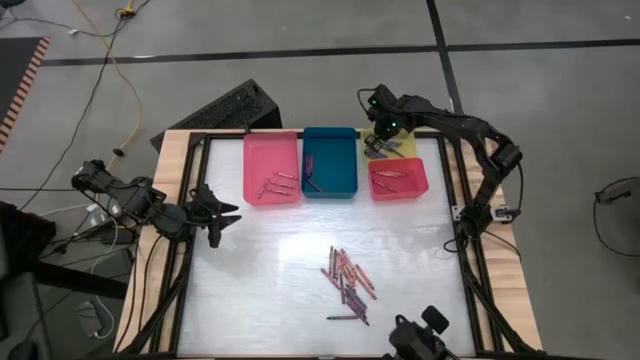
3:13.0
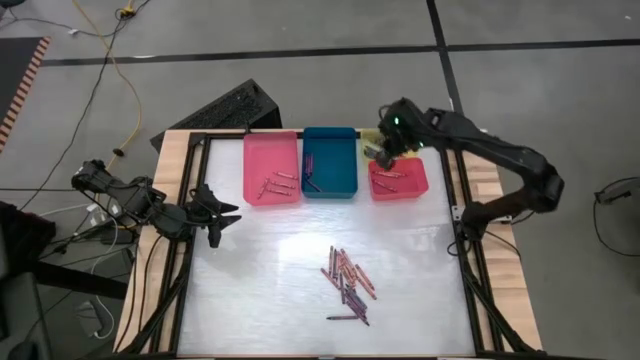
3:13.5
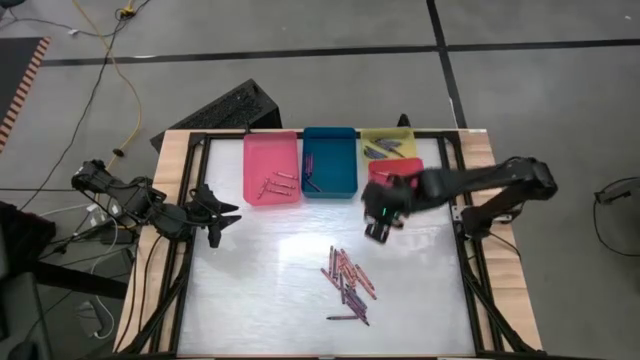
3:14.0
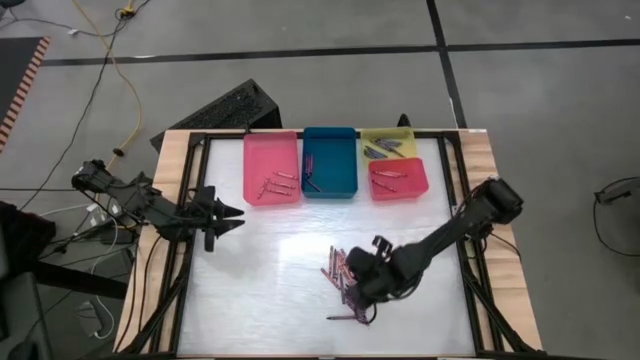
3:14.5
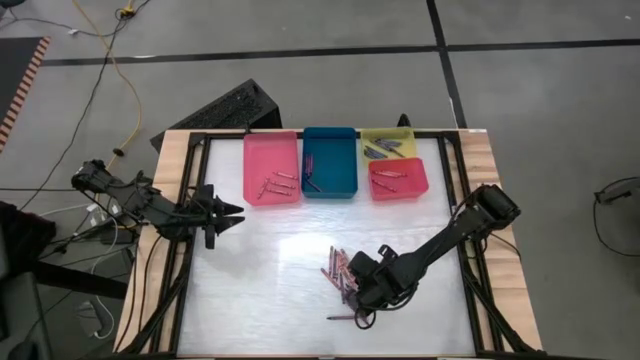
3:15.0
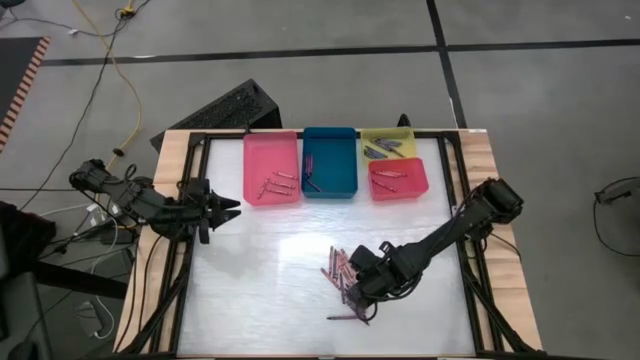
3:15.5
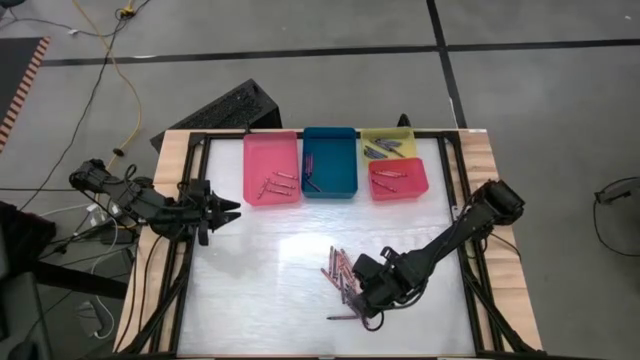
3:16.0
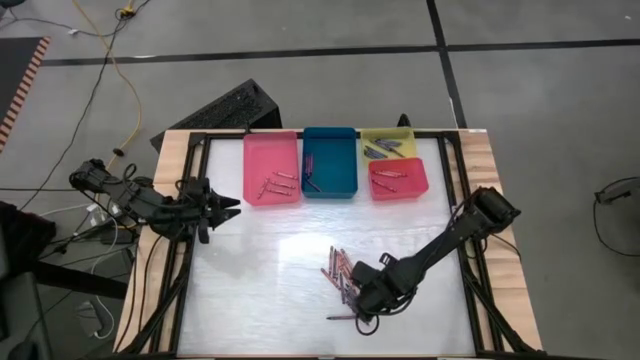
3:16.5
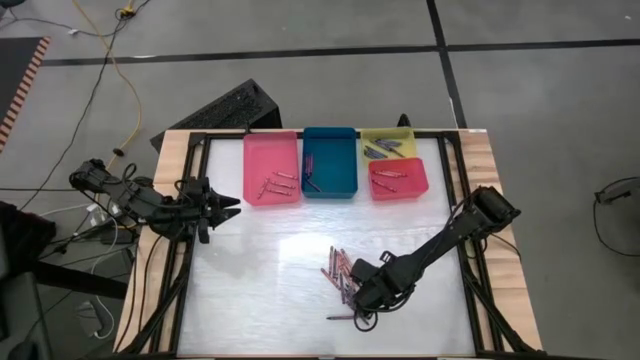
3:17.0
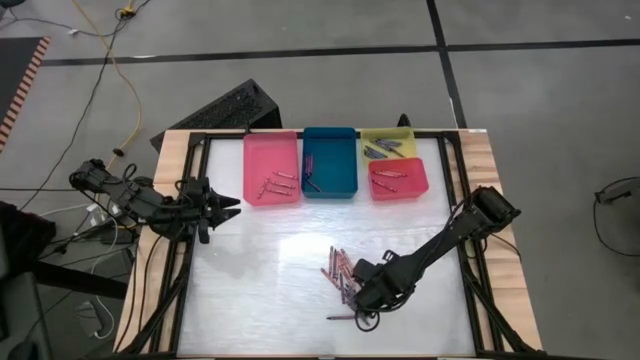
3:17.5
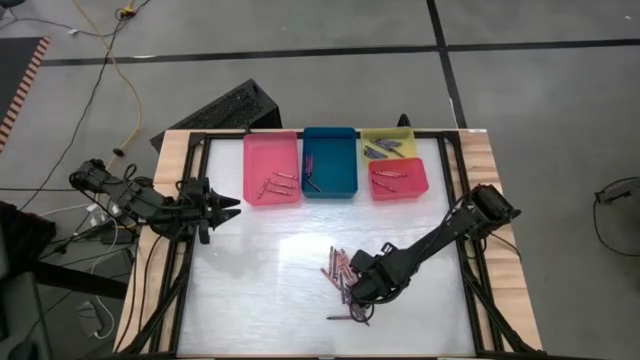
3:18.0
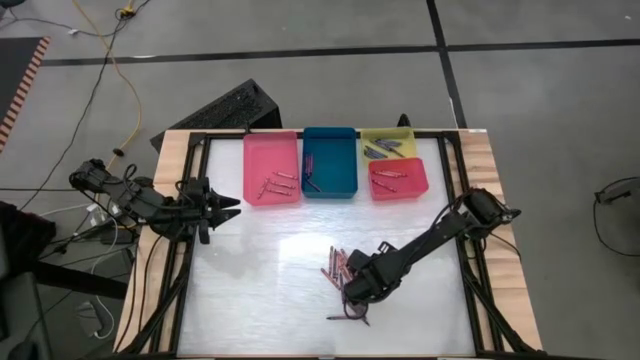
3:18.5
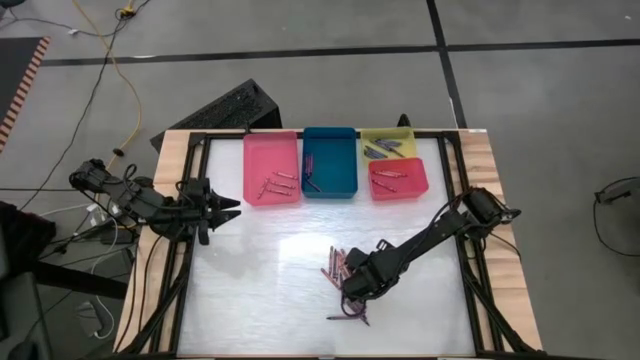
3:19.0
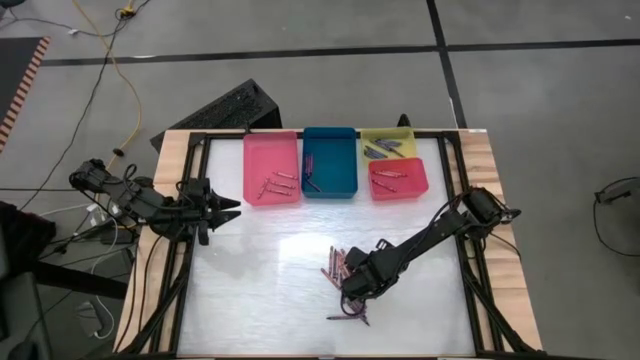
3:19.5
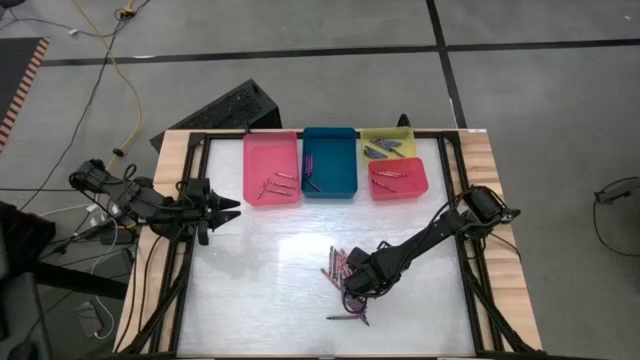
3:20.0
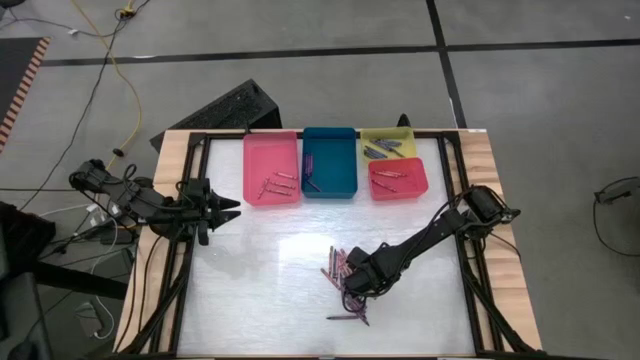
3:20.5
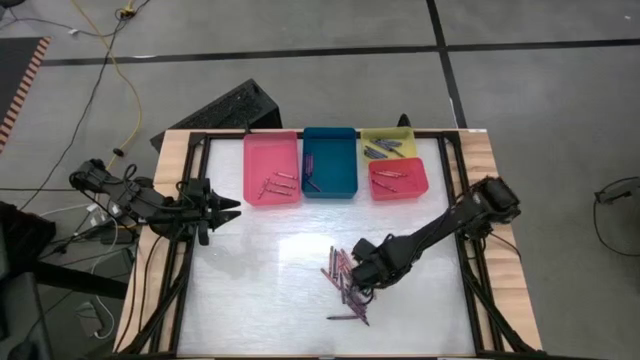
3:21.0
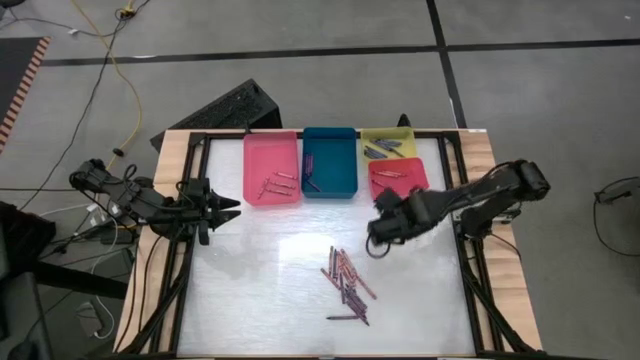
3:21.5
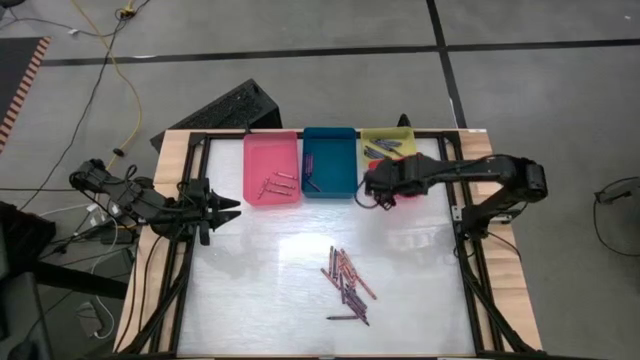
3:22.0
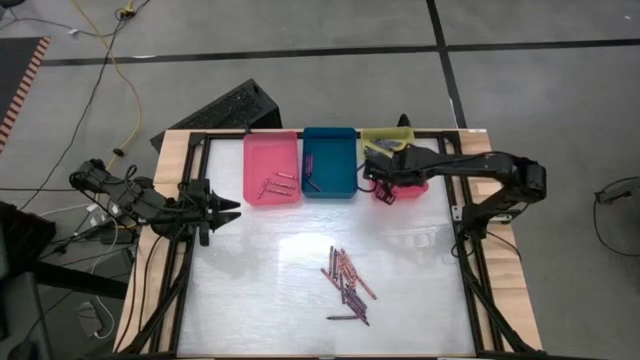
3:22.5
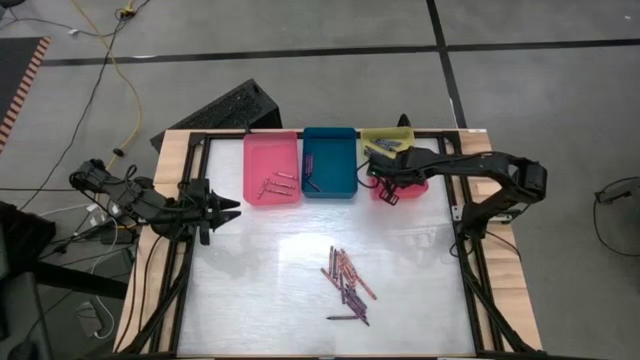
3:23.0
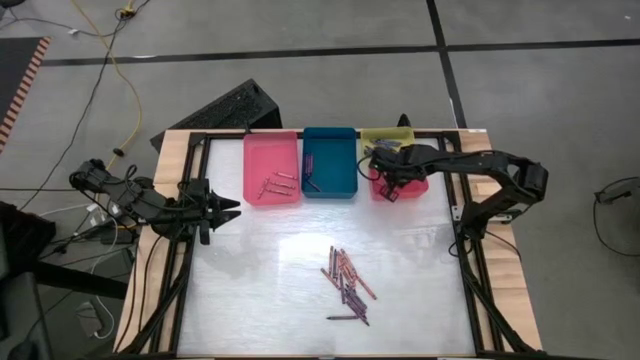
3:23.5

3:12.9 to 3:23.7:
Task: Sort crayons
Put the red crayon into the red bin

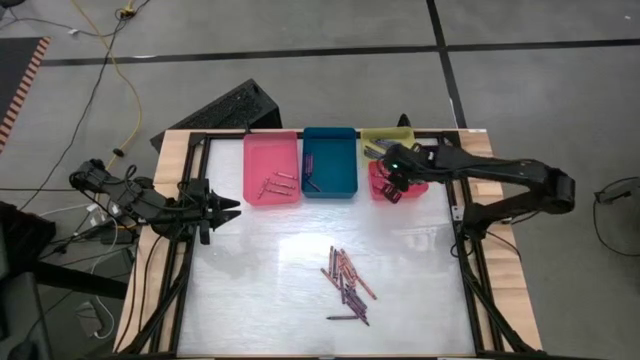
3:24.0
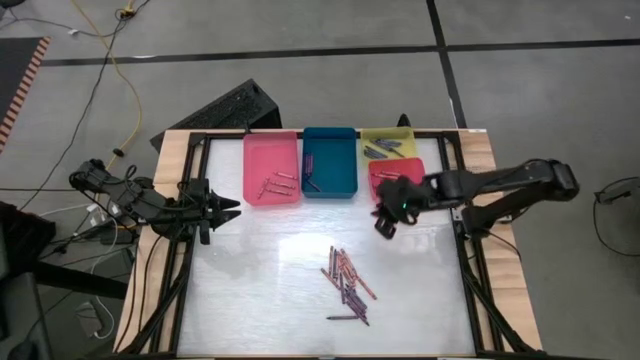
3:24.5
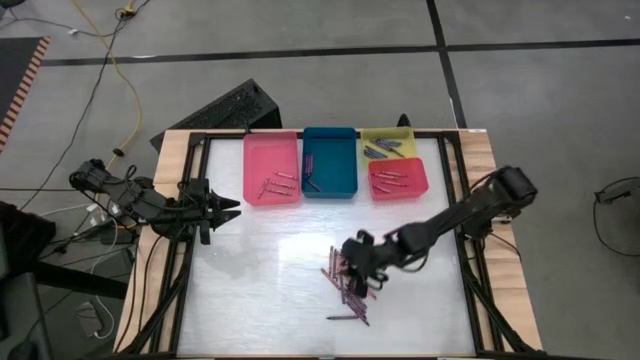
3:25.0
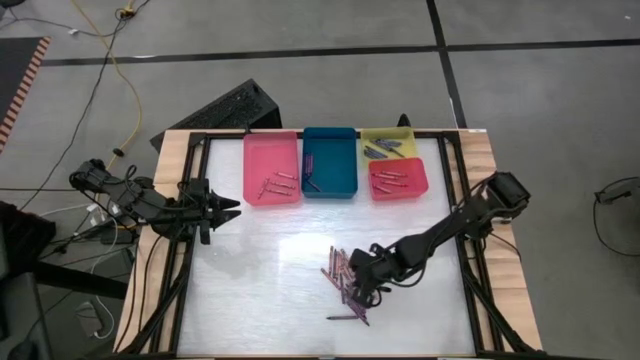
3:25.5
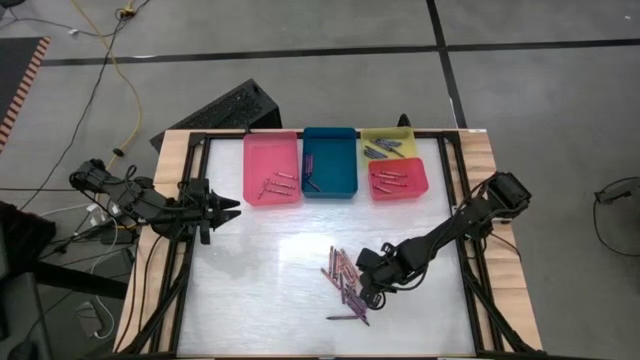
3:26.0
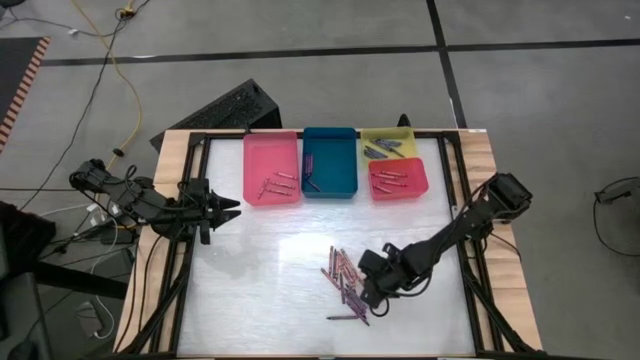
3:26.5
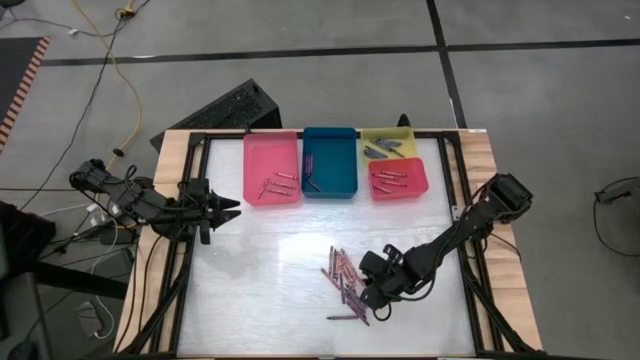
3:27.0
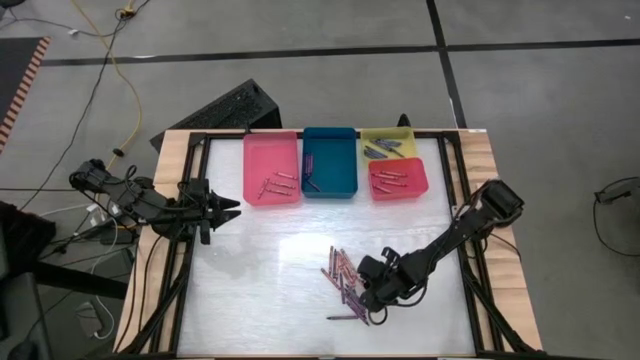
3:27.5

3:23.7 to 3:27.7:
Put the red crayon into the red bin

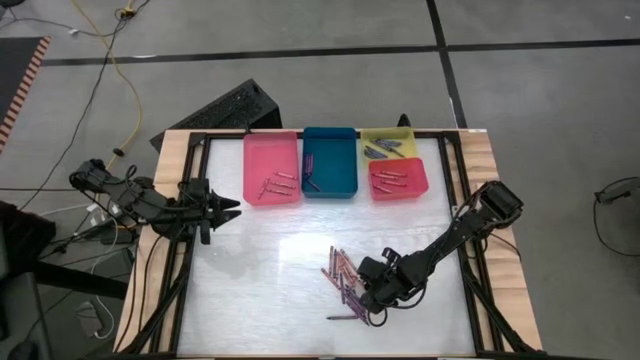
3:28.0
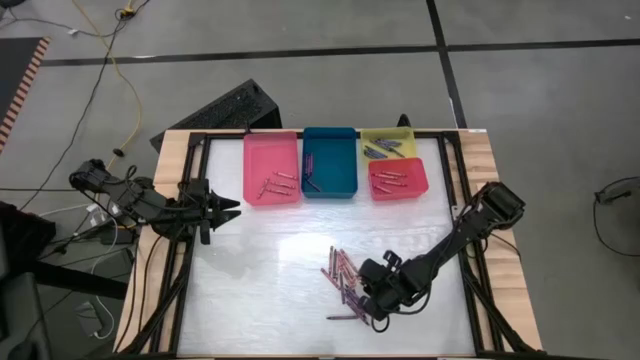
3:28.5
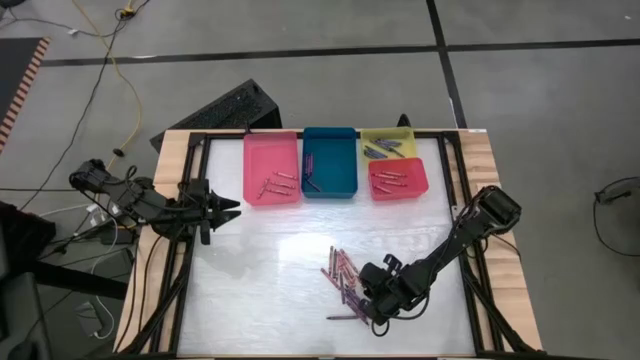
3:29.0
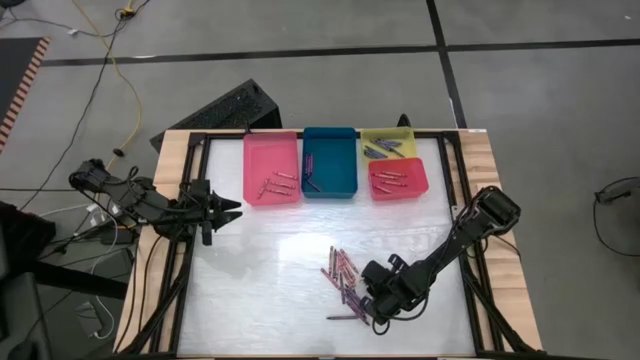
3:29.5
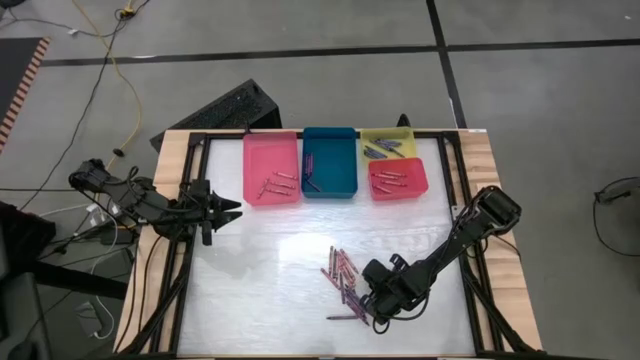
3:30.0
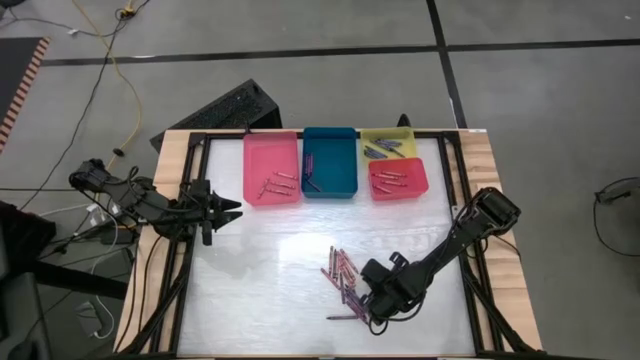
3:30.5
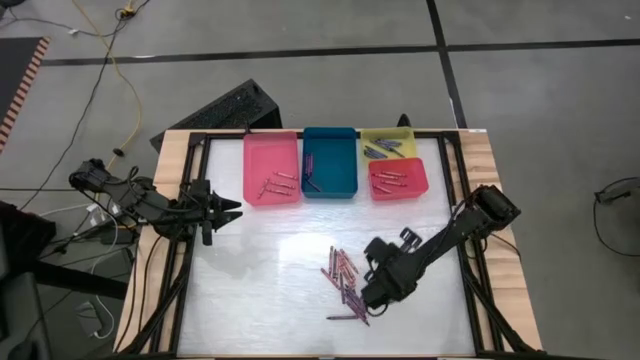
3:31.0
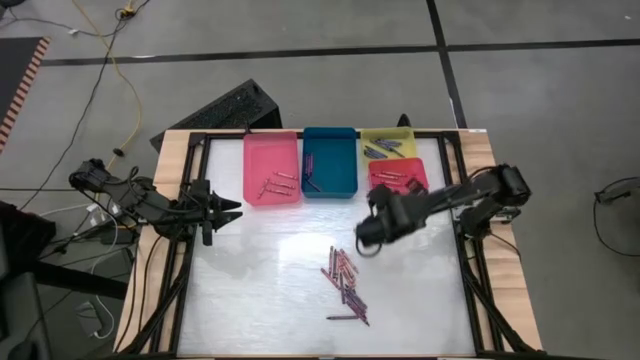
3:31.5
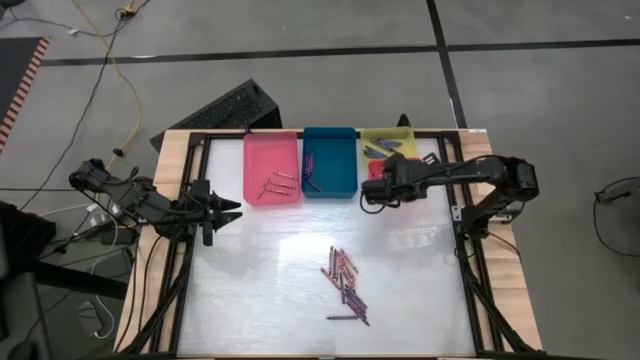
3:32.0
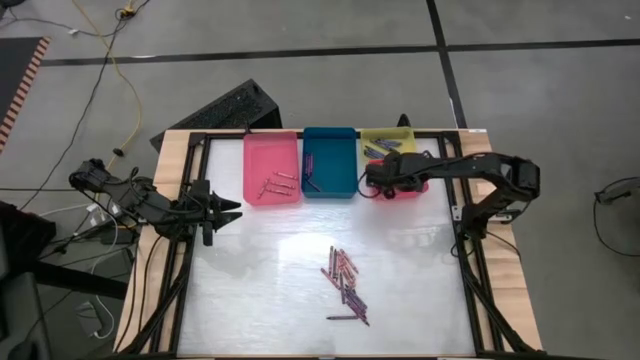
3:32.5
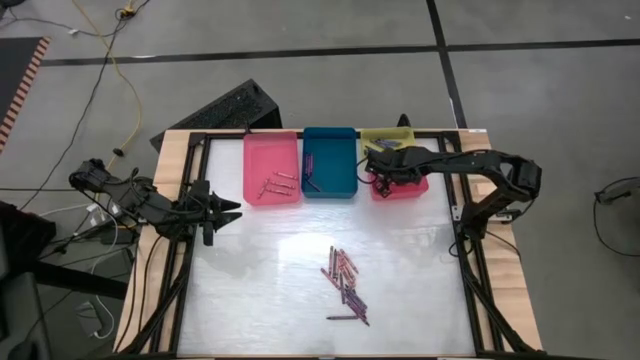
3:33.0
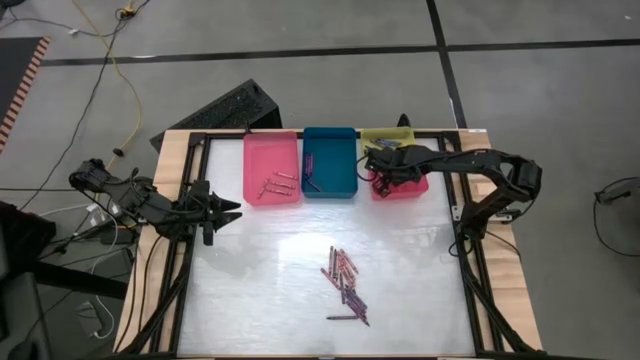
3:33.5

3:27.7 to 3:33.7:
Put the red crayon into the red bin
